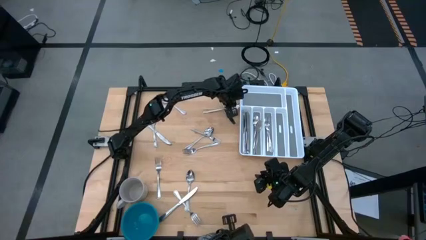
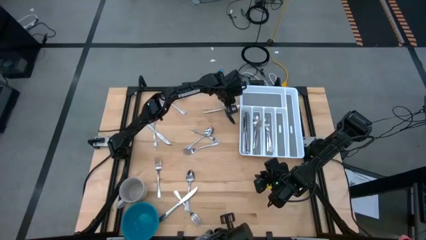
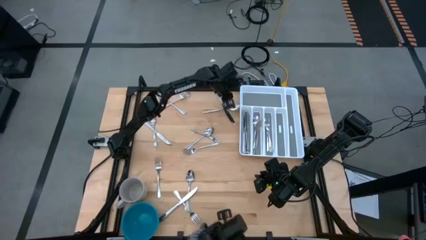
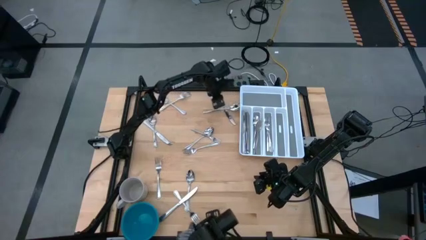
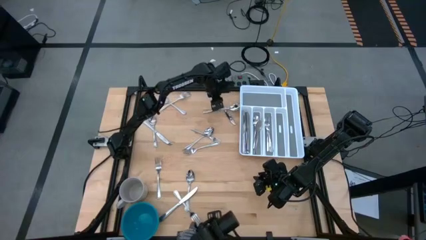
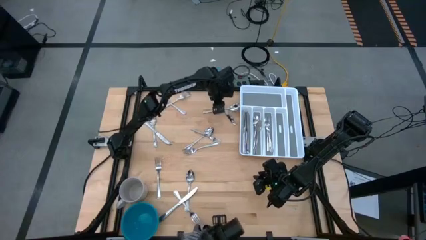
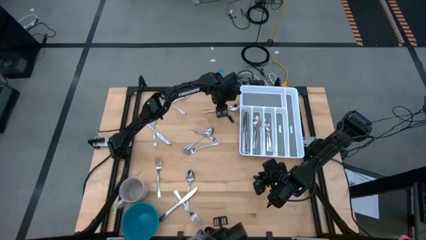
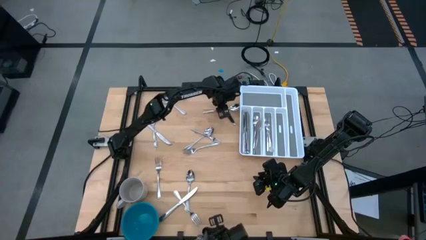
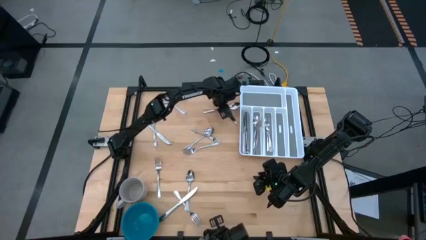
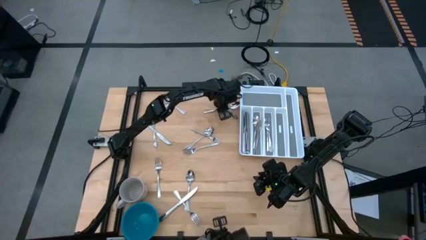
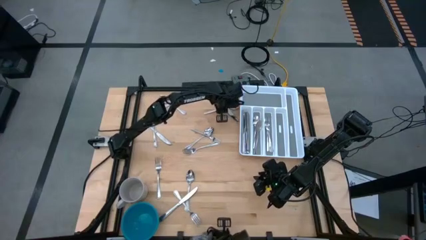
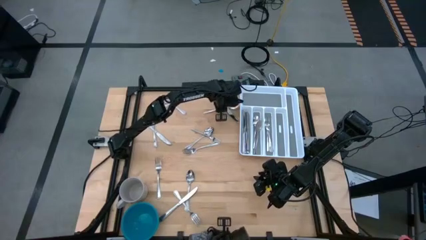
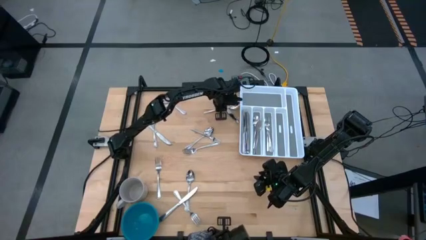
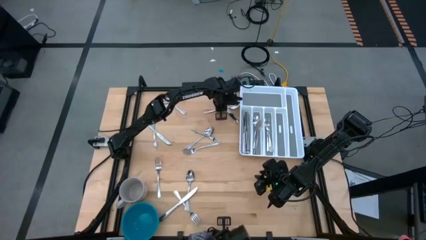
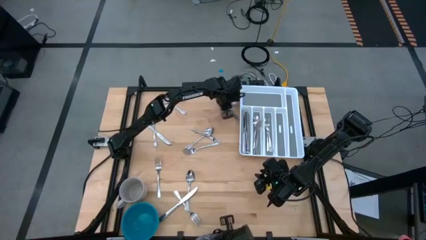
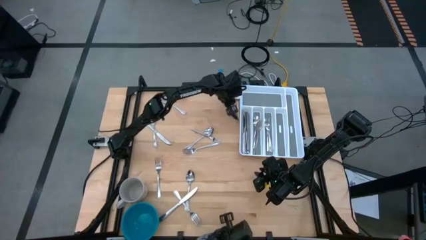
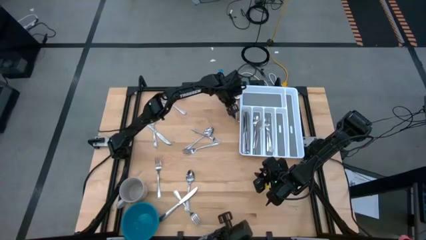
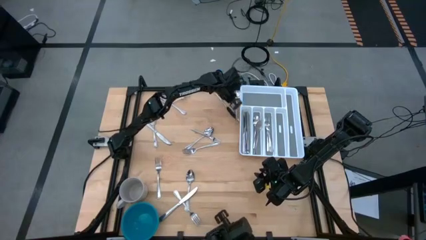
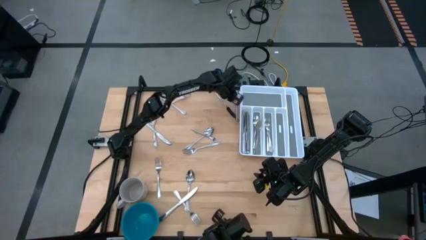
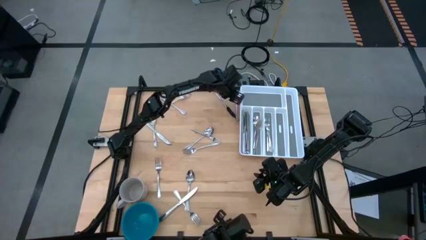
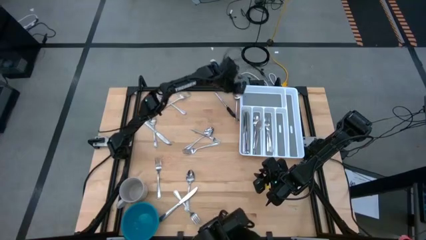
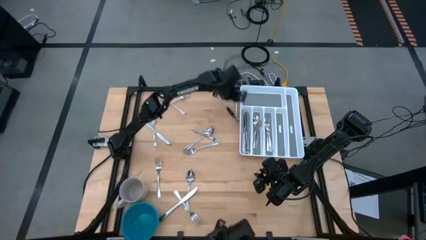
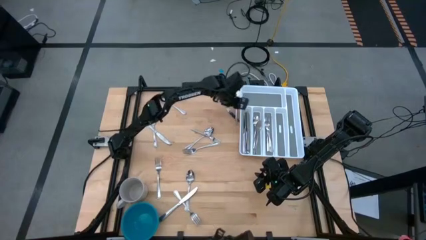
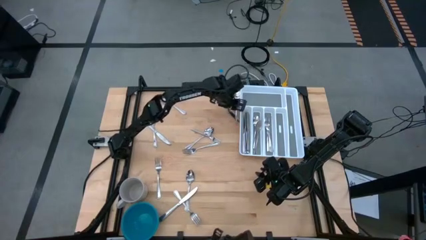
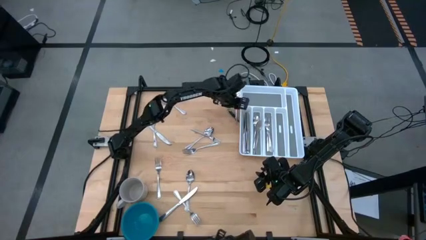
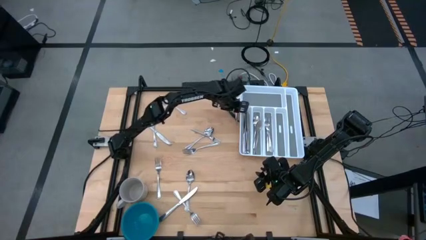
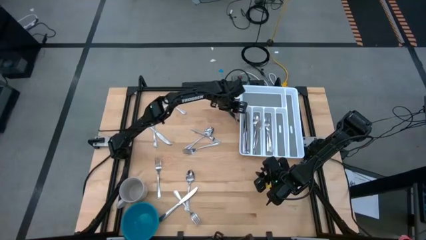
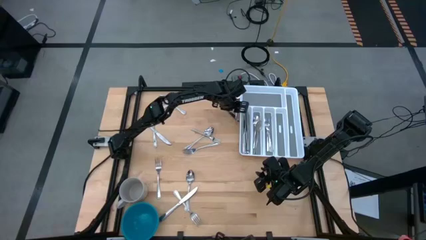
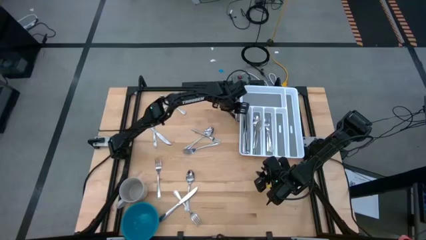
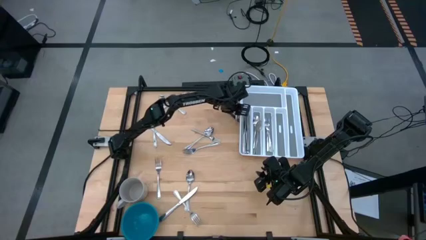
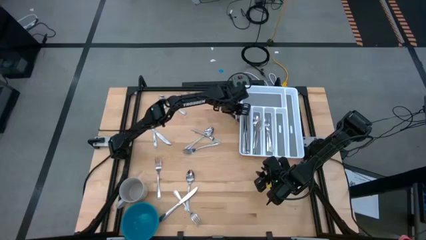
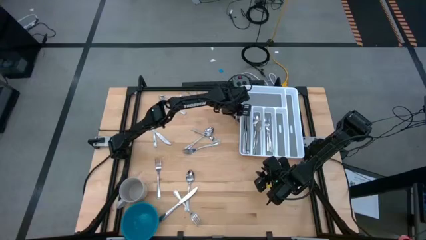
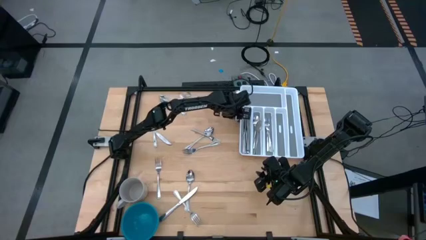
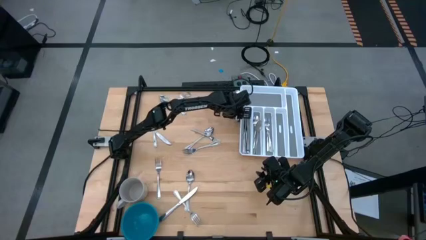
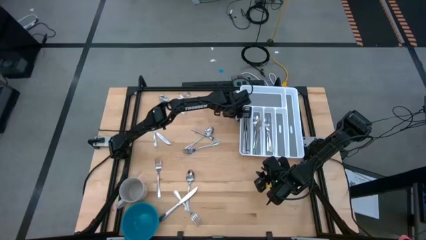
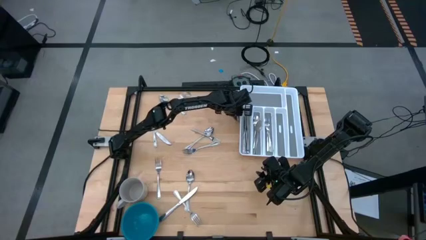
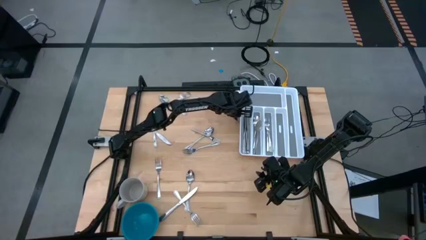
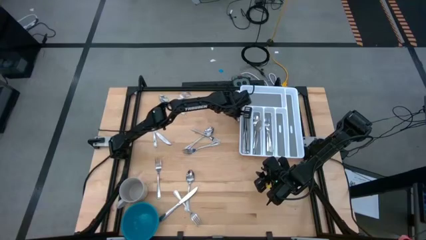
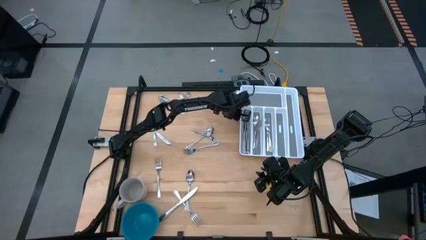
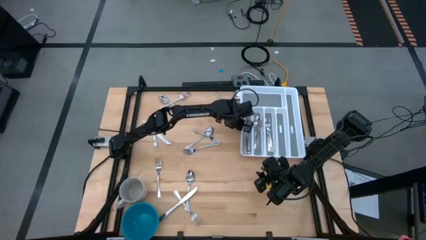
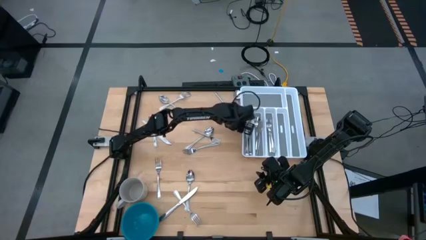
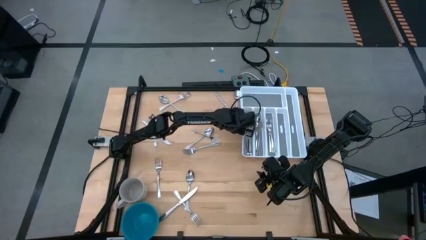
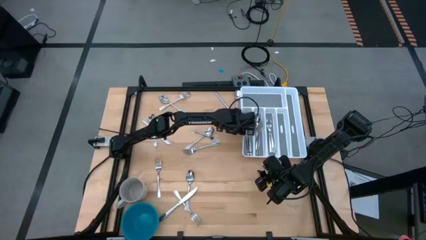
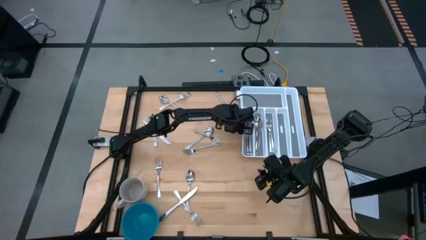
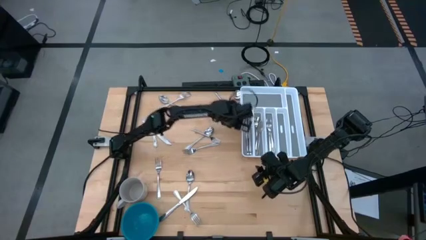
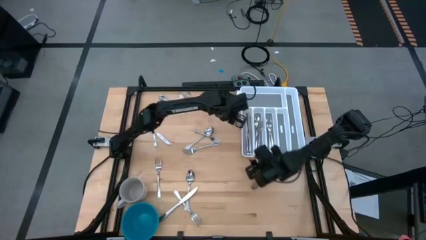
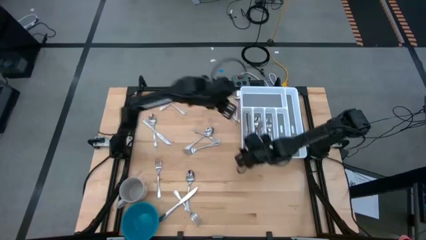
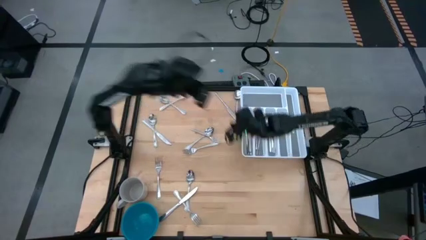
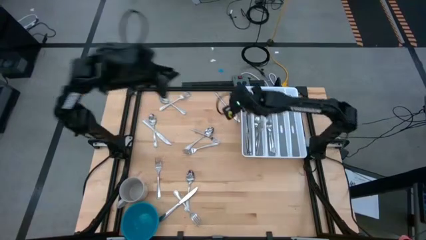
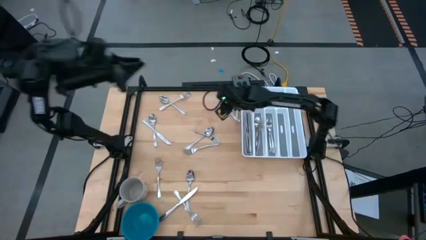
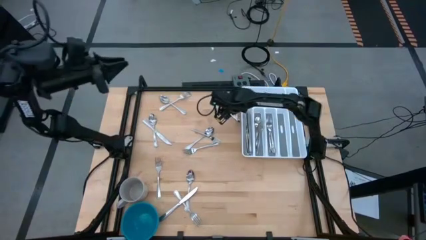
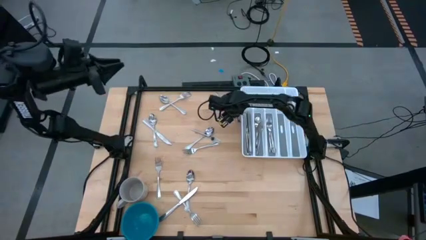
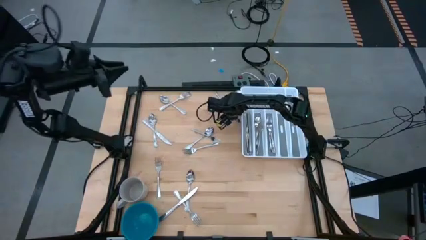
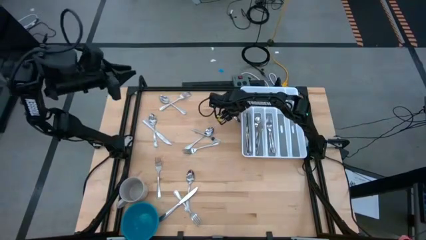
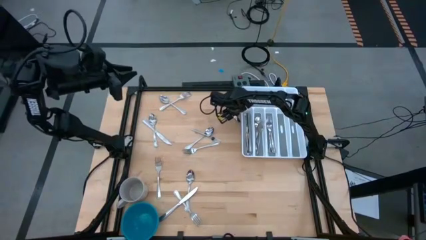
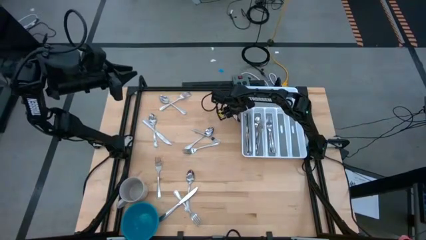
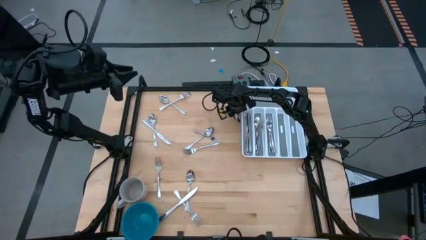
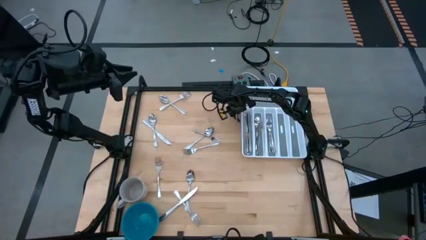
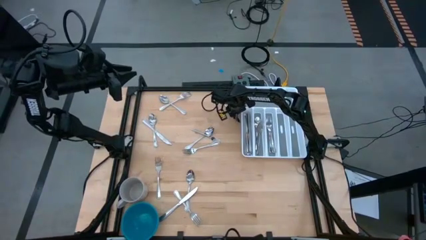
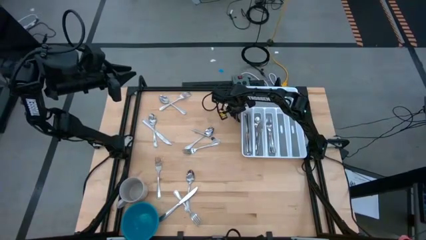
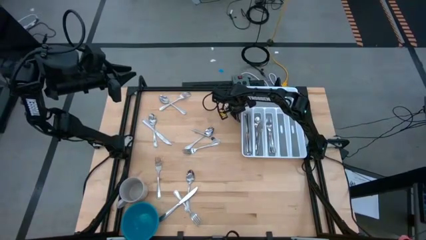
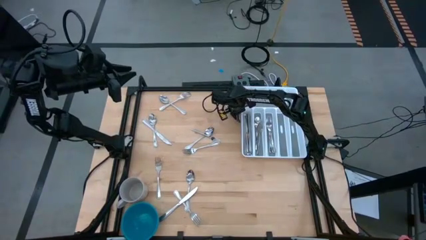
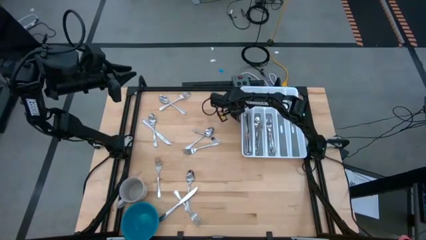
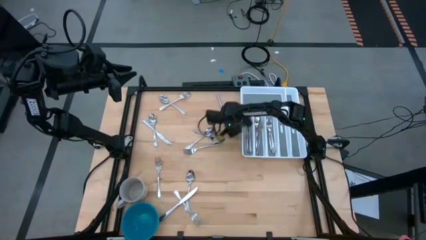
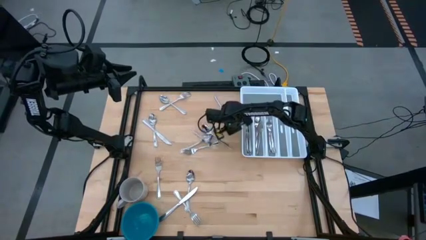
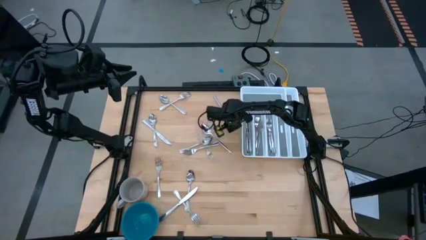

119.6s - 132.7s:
Task: Sort silverware
Put the spoon into the silverware tray

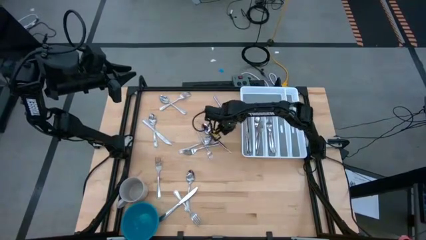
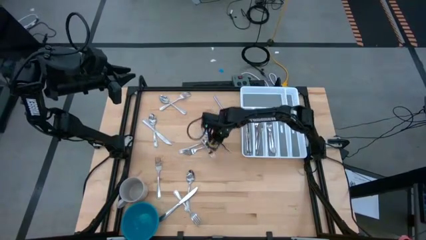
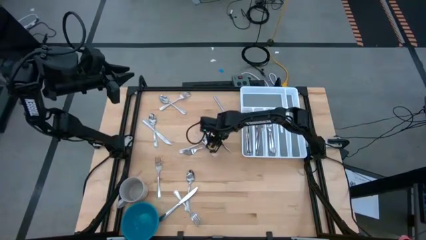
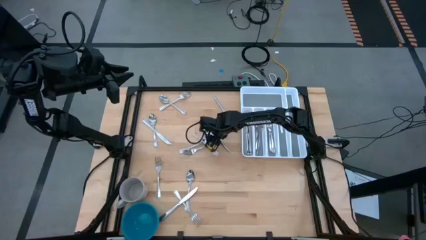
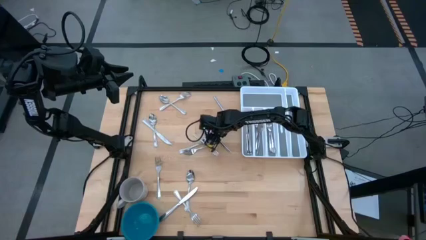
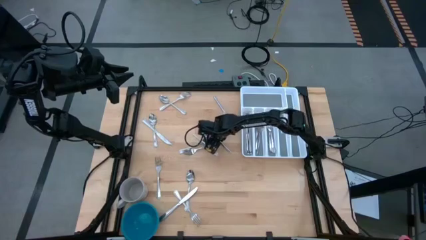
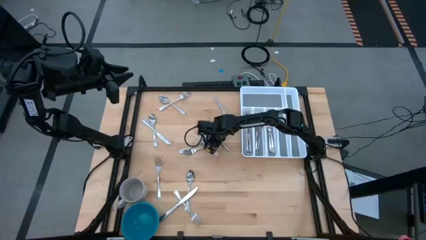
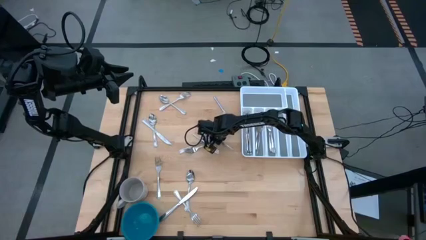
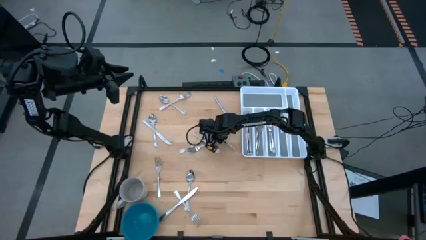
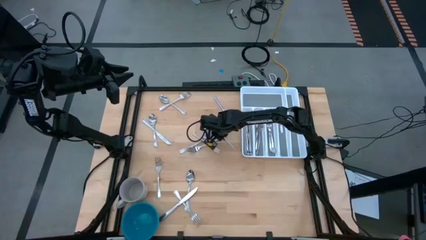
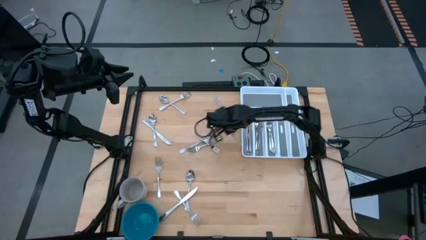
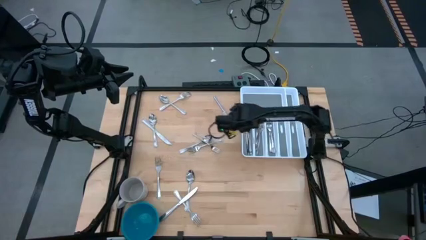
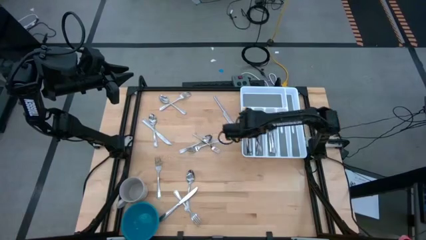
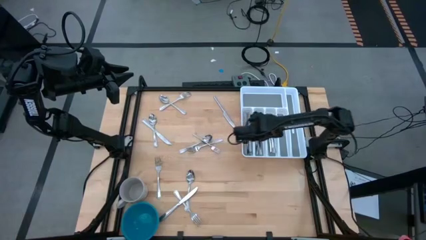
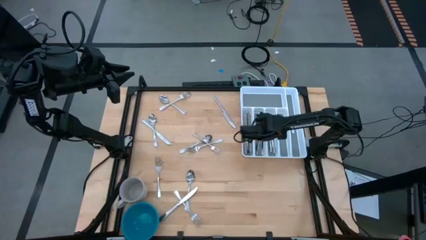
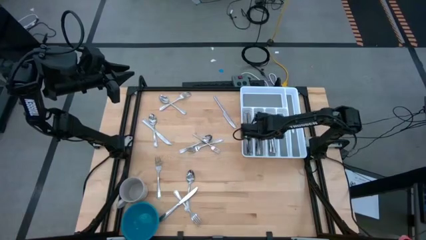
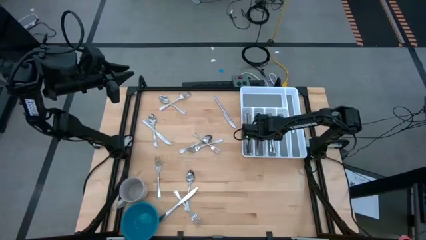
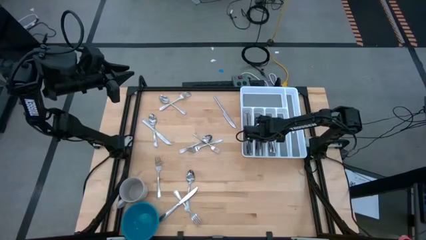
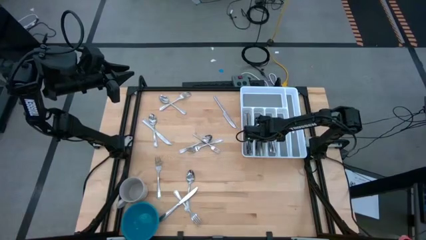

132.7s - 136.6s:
Put the spoon into the silverware tray
